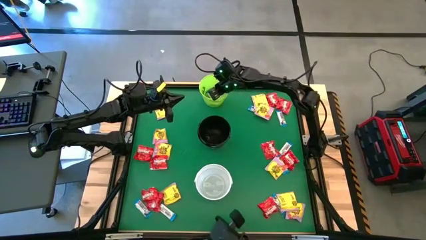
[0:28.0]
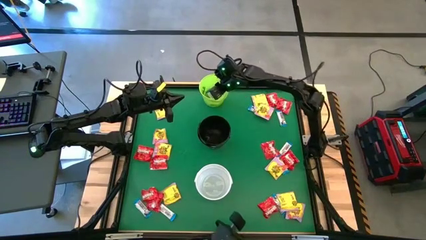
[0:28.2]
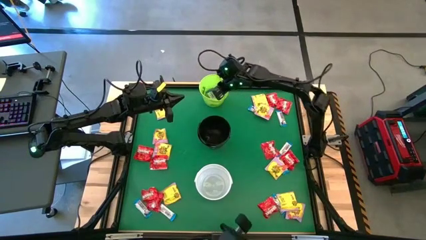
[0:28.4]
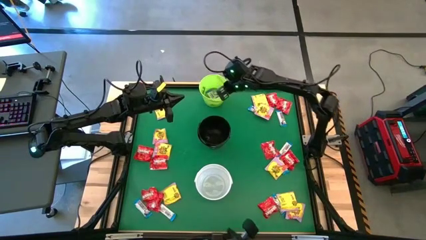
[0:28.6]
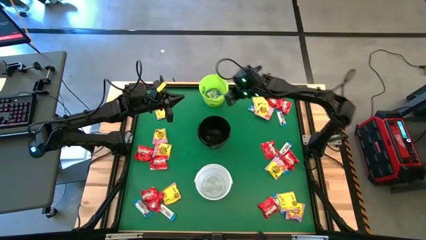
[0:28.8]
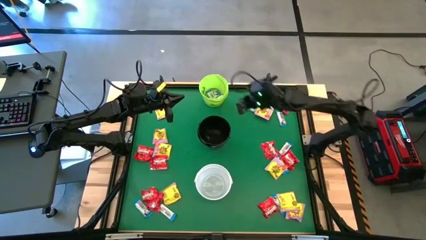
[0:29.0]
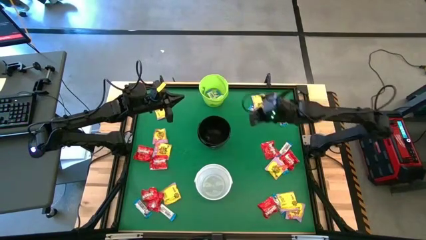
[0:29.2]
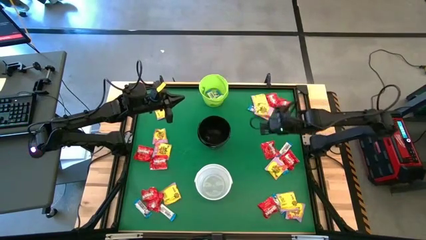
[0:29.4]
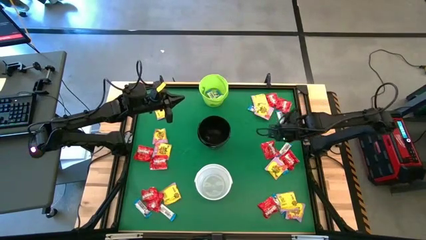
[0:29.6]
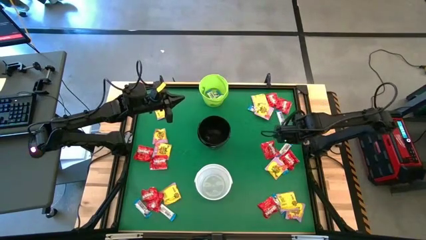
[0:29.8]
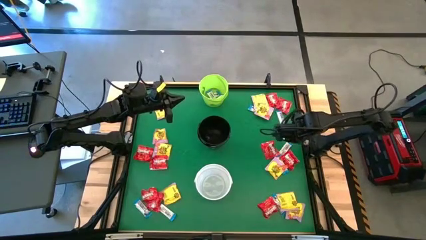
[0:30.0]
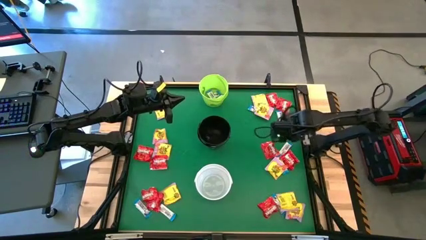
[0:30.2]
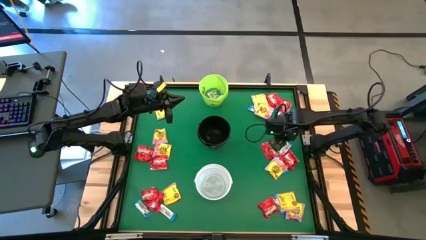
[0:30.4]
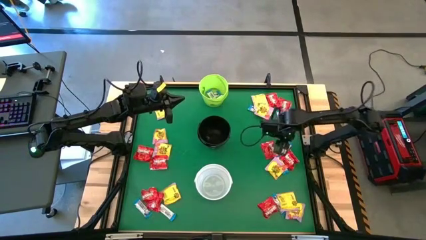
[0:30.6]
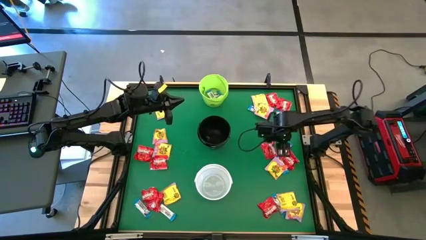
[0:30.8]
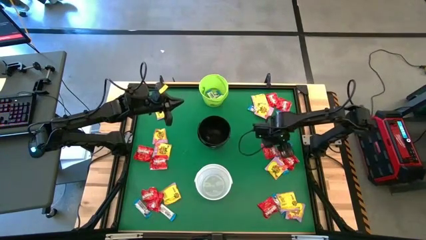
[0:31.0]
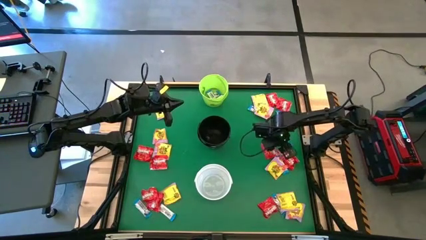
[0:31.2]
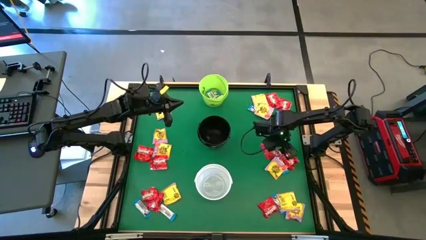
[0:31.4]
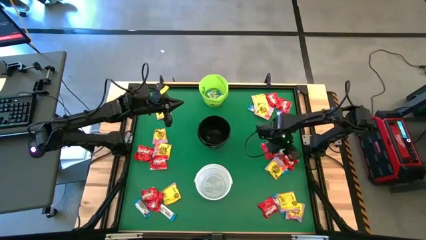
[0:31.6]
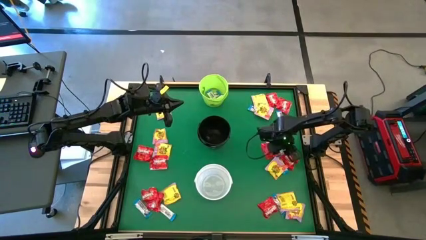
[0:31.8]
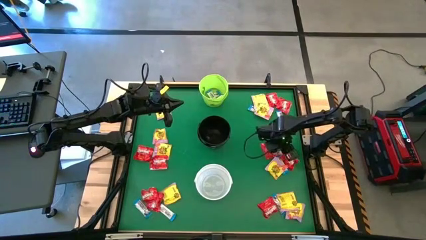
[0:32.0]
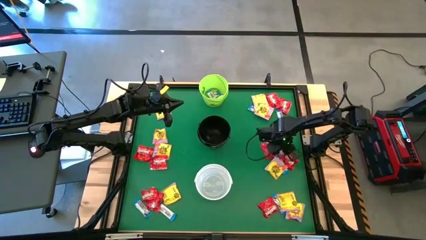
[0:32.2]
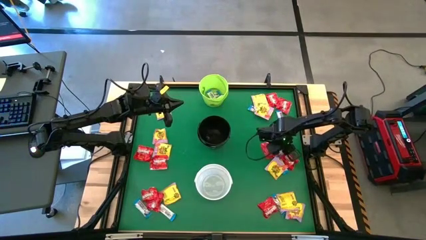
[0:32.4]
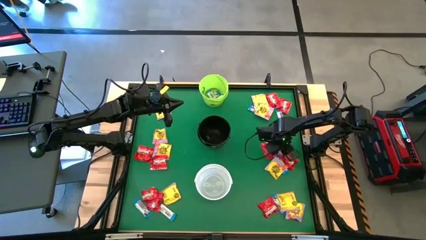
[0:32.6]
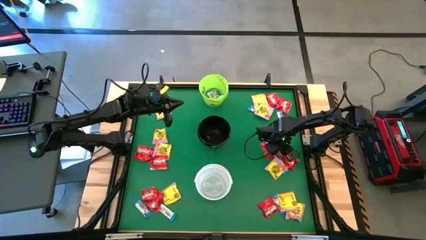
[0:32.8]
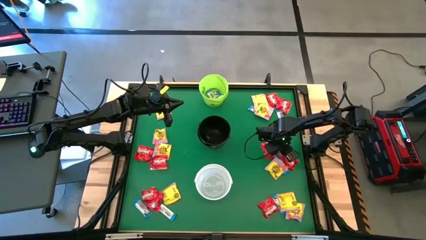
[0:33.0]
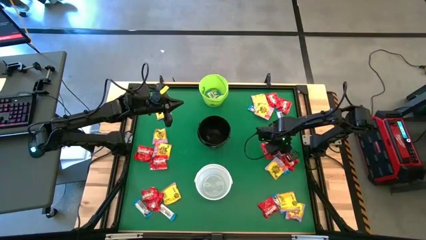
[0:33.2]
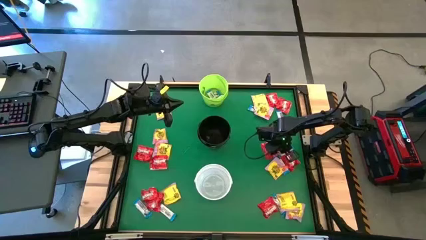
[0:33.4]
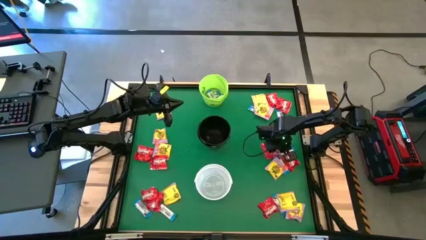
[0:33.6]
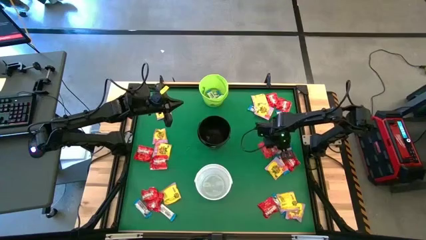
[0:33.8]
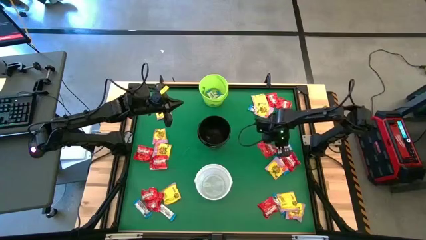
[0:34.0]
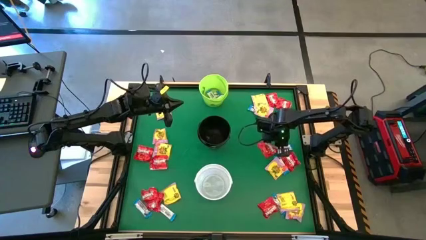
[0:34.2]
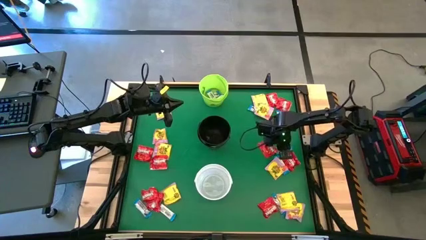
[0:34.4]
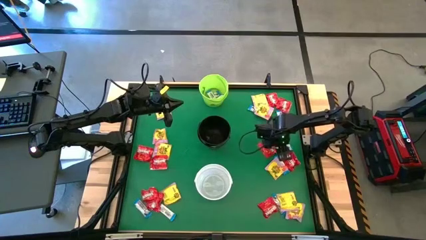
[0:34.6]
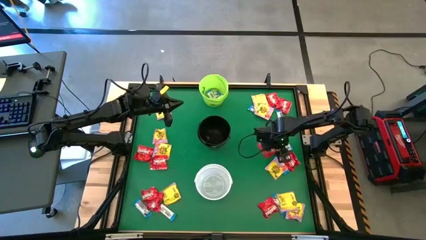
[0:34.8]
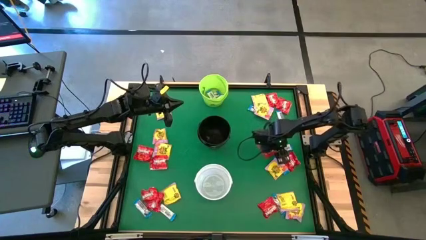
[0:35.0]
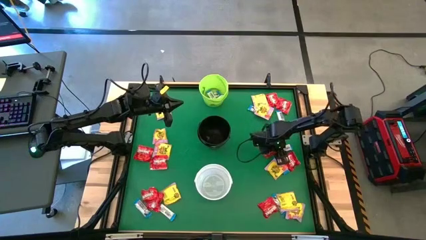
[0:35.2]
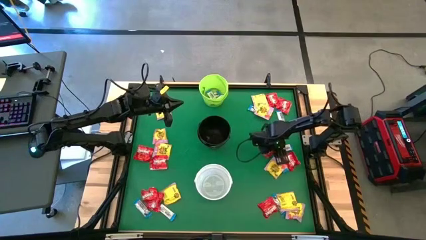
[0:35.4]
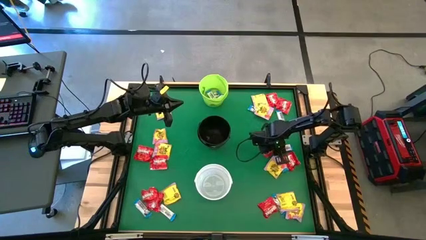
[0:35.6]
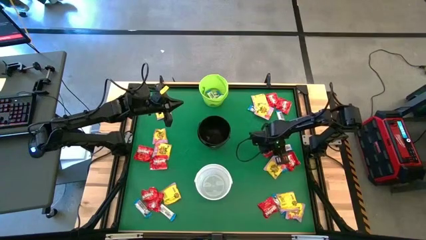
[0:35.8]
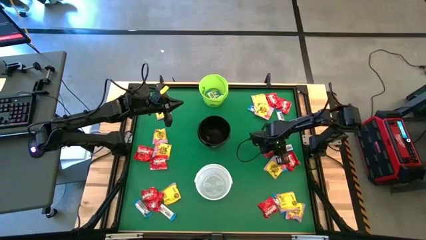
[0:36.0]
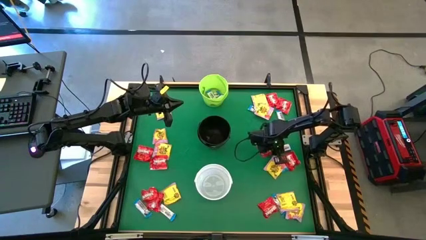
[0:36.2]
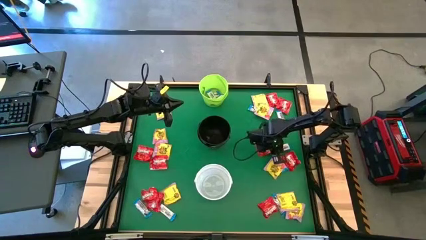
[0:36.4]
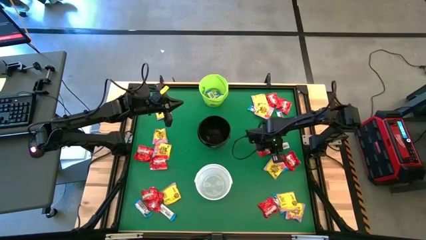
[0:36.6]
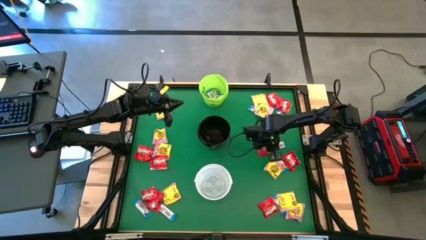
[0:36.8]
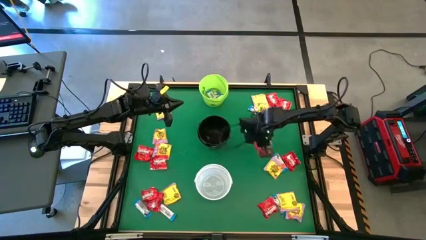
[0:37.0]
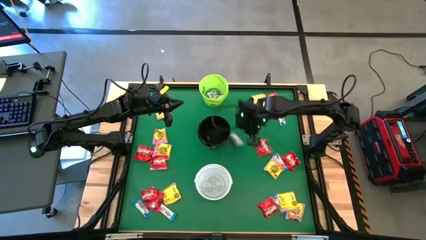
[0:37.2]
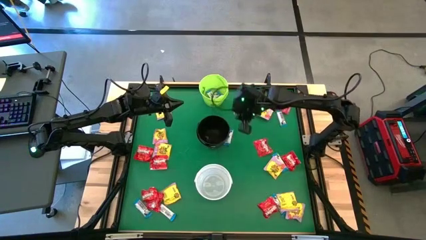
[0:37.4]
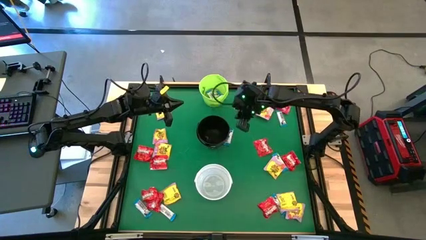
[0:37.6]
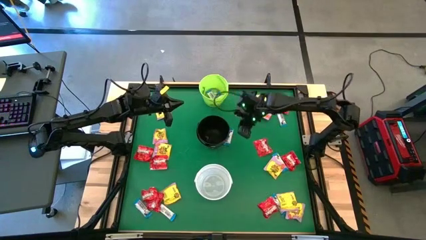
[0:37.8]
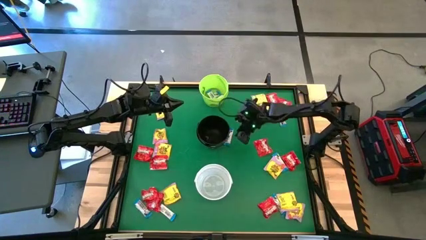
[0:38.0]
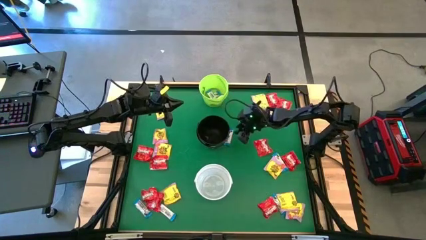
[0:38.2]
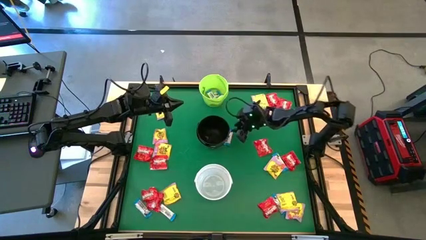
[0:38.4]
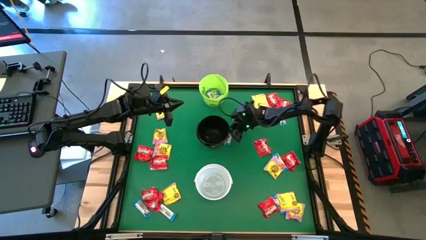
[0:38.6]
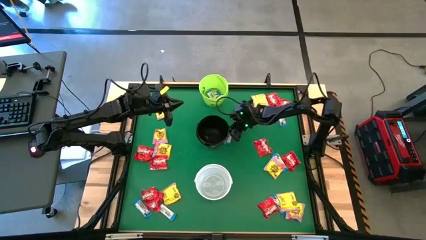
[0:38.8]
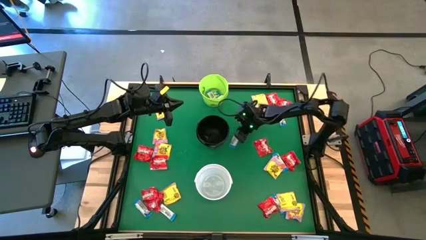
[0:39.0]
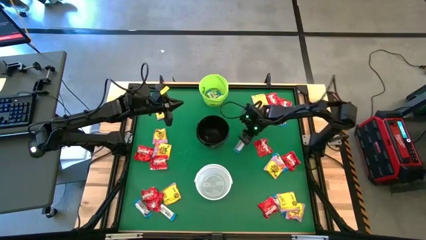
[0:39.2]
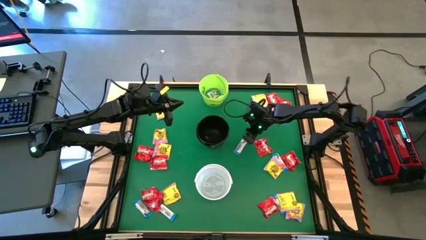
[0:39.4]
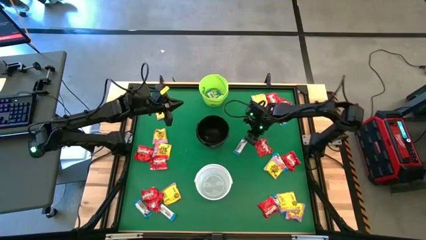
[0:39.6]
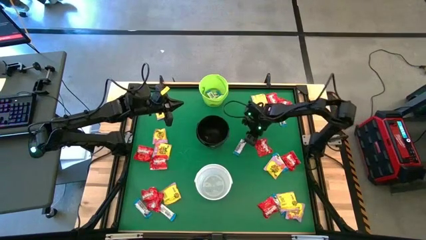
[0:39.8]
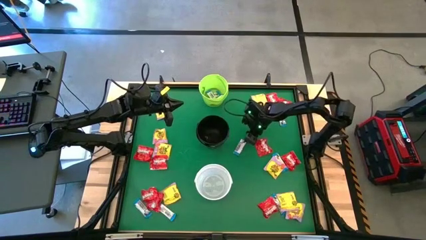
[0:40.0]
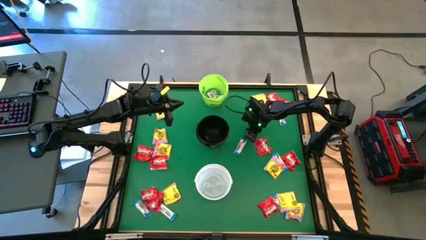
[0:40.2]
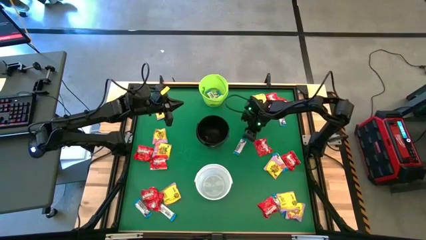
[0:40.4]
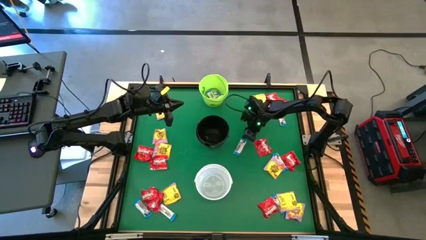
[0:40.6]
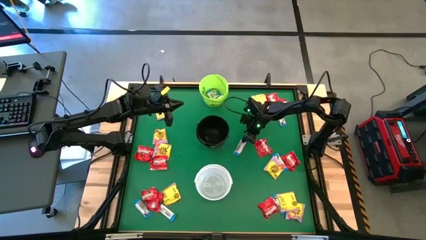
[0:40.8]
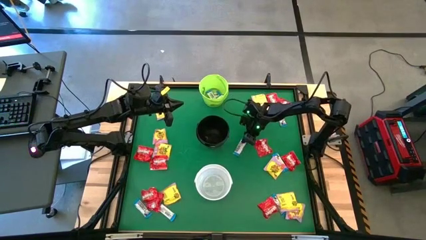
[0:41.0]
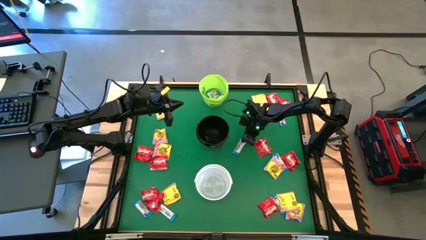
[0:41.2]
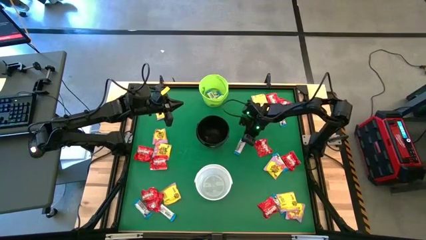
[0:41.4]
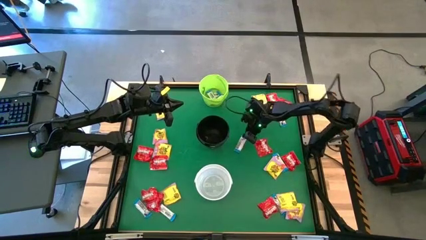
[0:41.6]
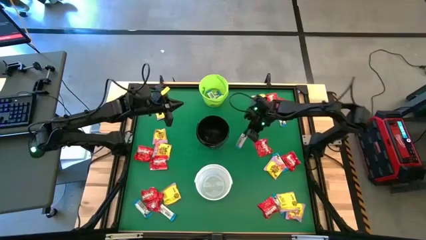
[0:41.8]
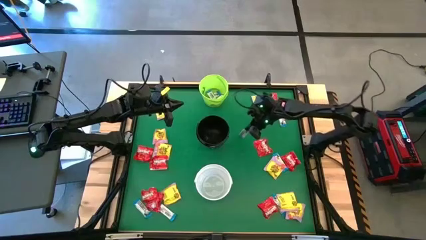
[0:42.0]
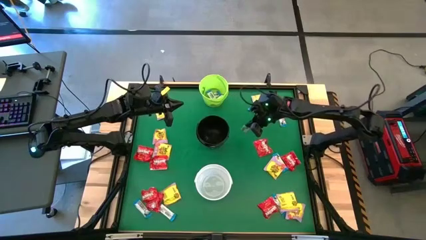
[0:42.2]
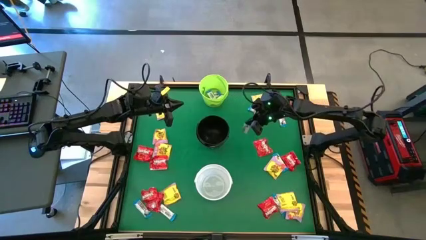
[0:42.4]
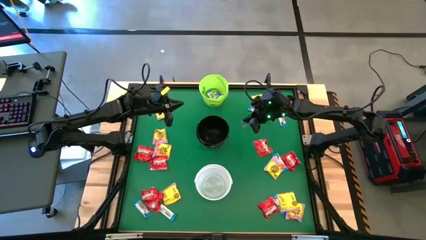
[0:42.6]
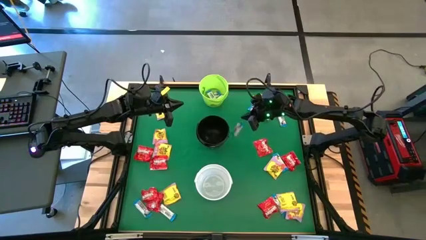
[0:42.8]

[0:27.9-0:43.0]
Task: Sort candy by brand, put in halloween buckets
Put the white chocolate into the green bucket

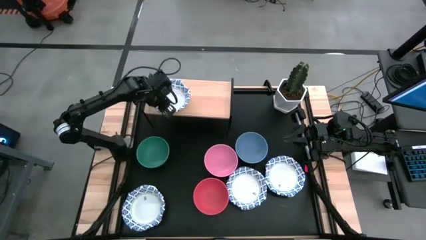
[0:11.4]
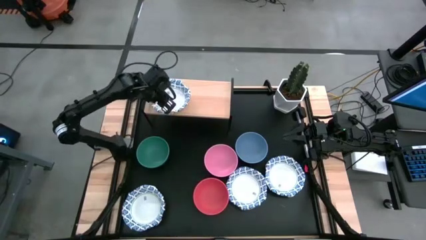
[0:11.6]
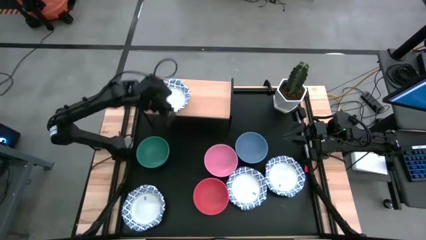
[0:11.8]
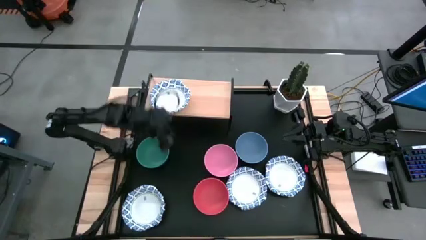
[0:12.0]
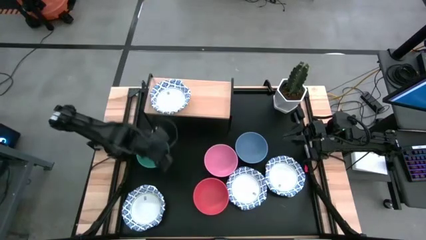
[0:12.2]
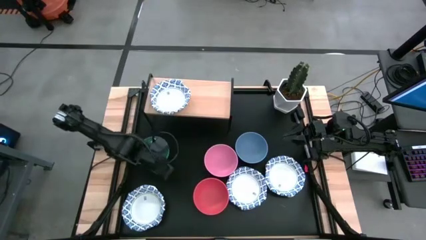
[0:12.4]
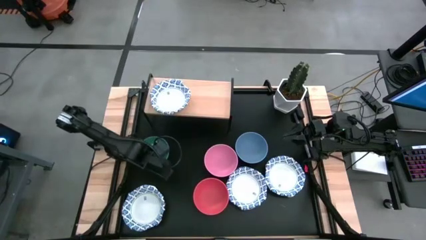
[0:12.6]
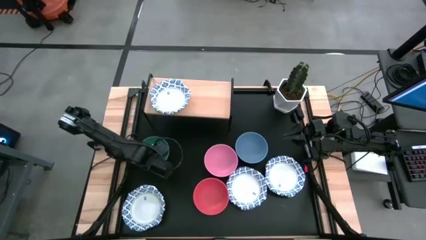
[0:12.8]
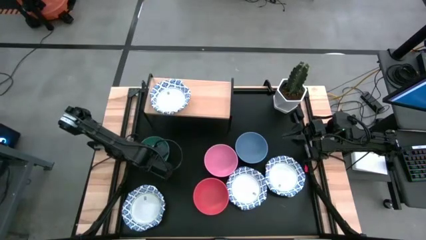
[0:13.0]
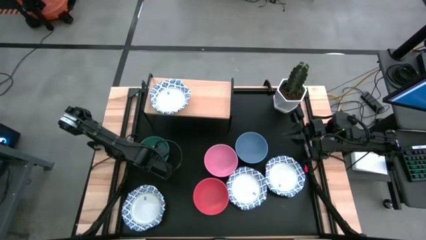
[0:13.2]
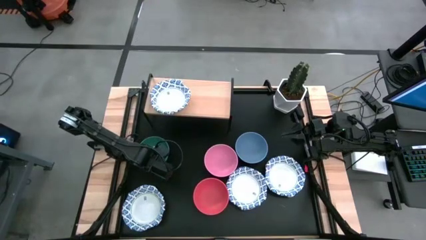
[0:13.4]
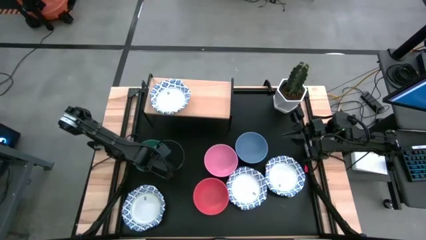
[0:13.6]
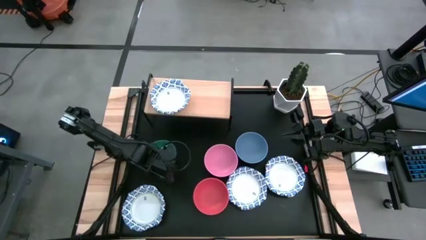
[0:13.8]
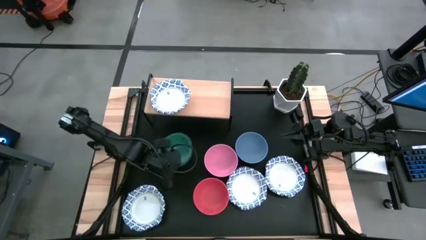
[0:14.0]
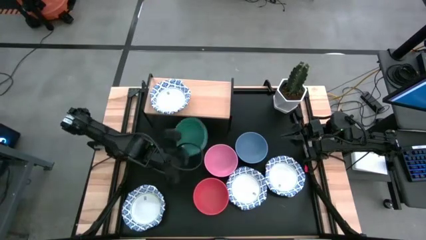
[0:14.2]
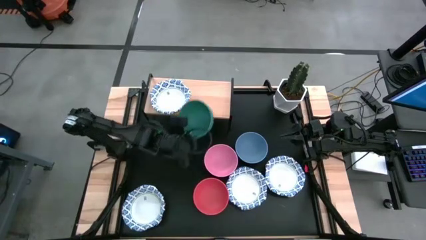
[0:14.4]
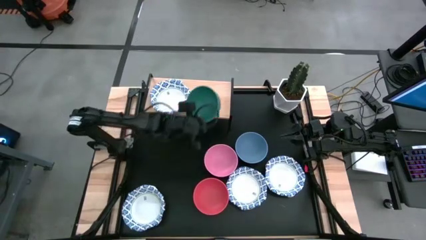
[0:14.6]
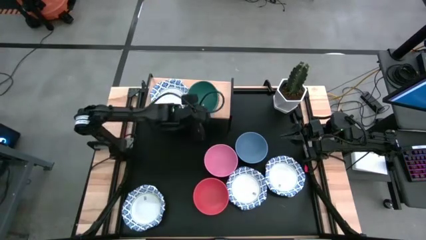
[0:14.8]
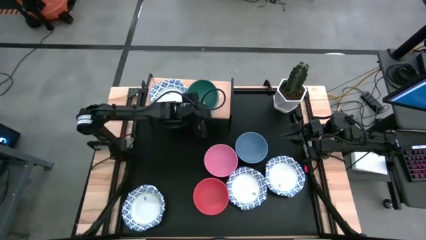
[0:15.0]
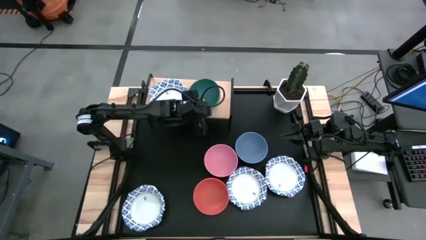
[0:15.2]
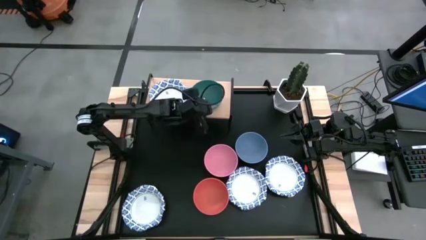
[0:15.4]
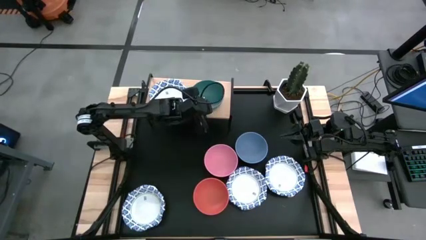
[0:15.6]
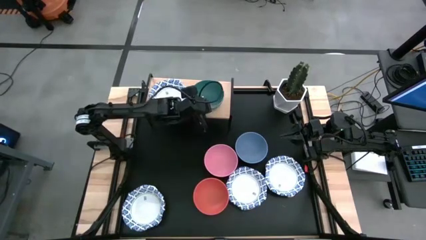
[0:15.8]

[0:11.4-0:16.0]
Task: Place and stack bowls onto a shelf
Put the green bowl on the shelf
